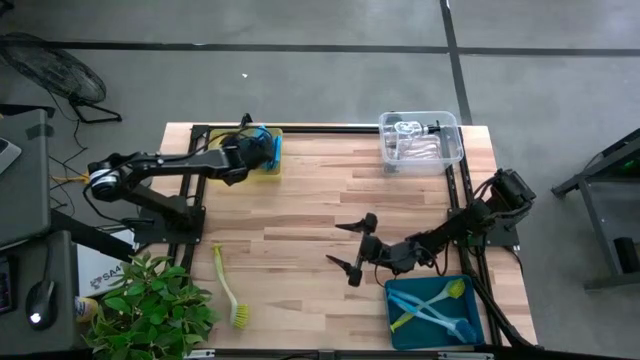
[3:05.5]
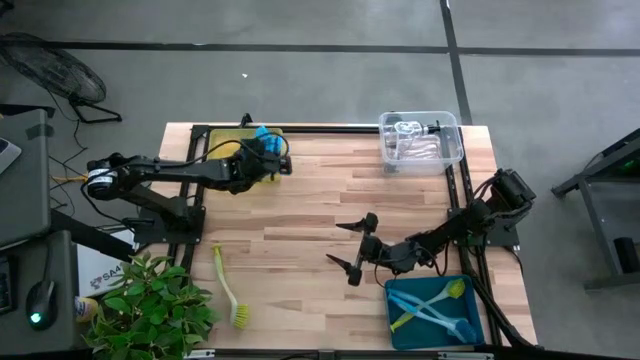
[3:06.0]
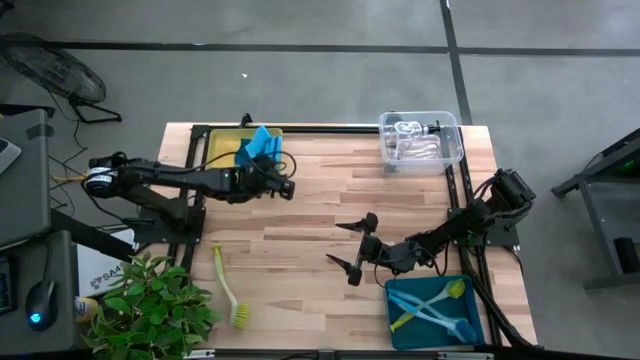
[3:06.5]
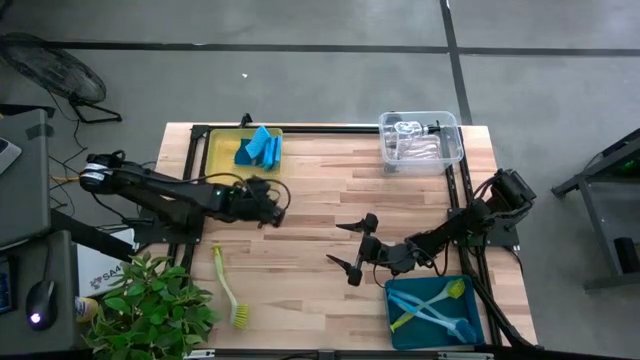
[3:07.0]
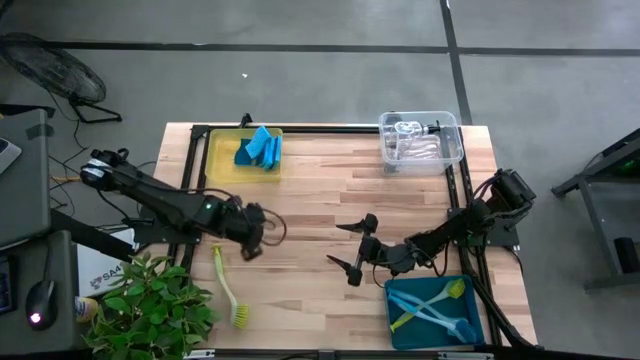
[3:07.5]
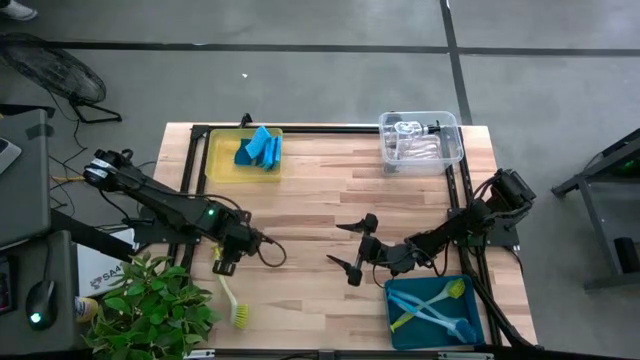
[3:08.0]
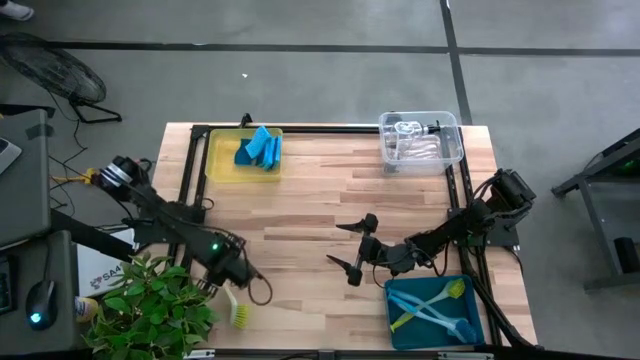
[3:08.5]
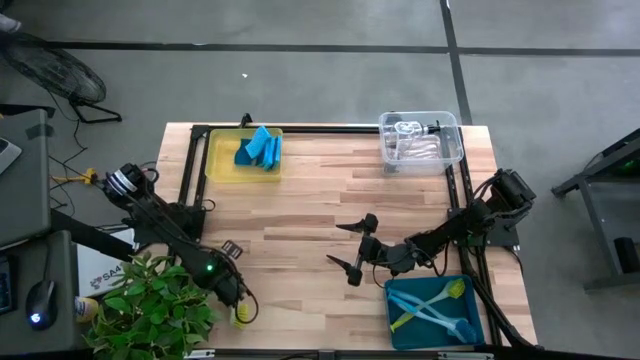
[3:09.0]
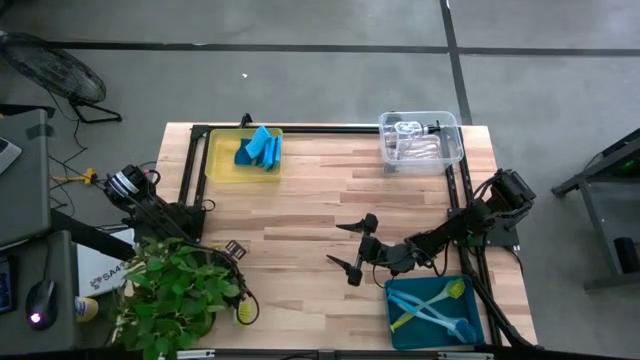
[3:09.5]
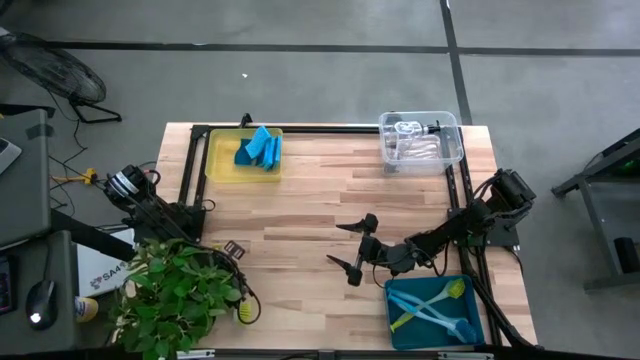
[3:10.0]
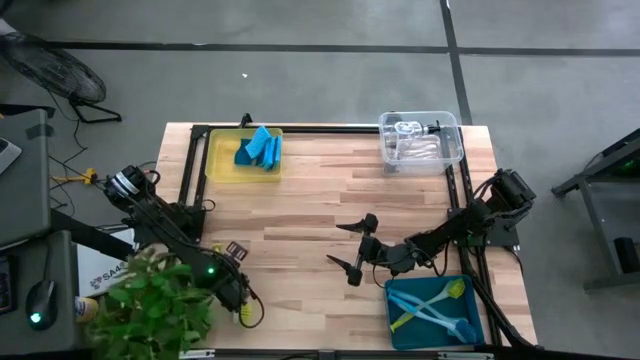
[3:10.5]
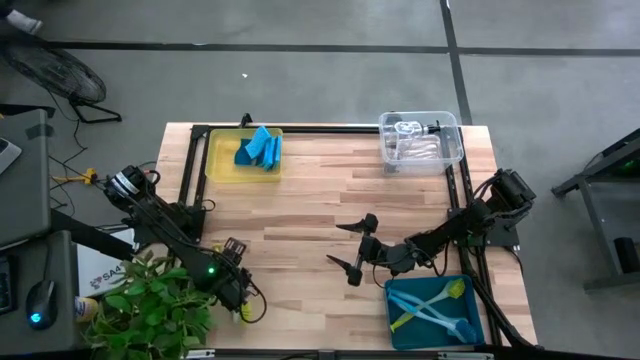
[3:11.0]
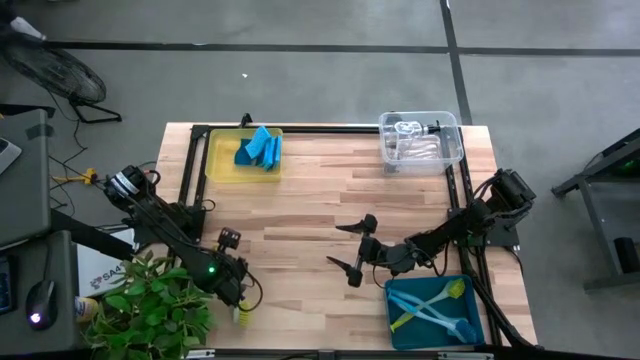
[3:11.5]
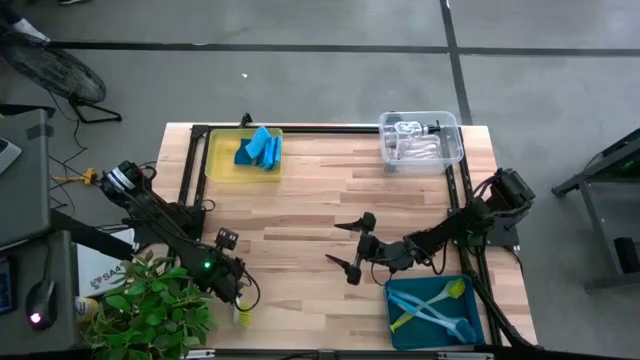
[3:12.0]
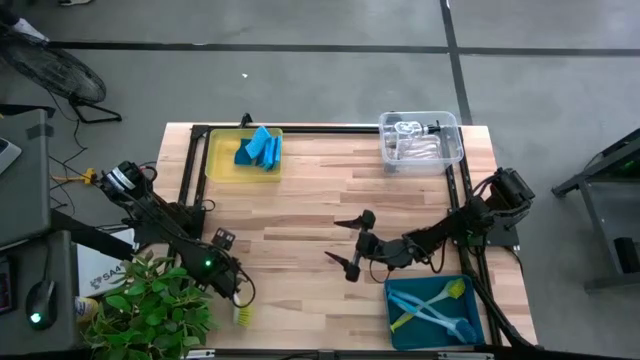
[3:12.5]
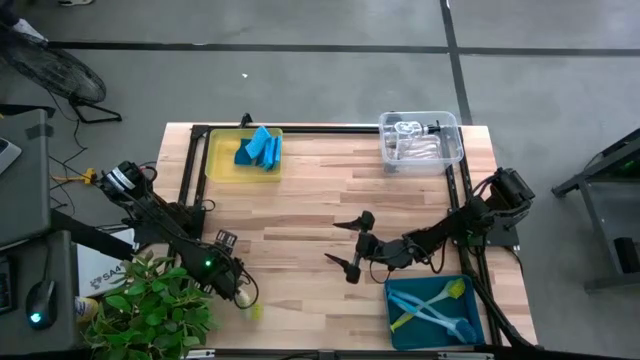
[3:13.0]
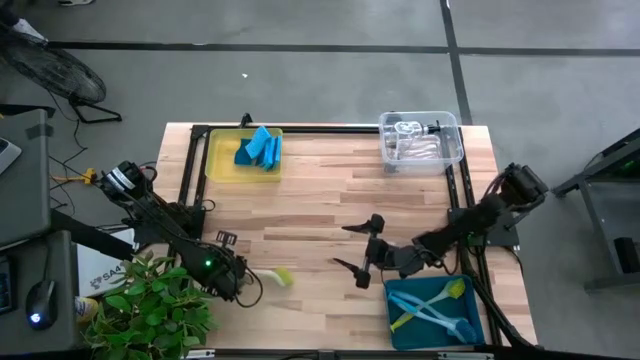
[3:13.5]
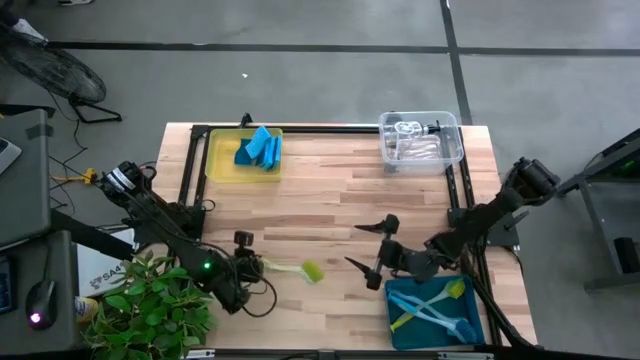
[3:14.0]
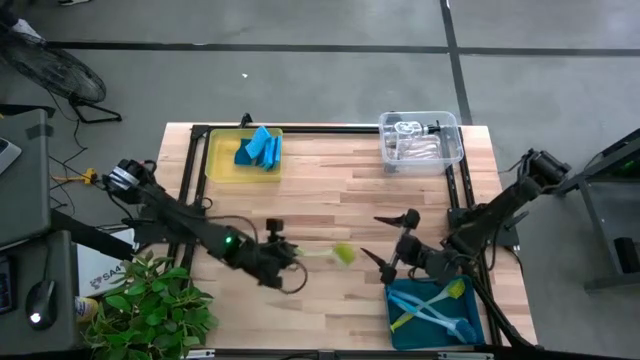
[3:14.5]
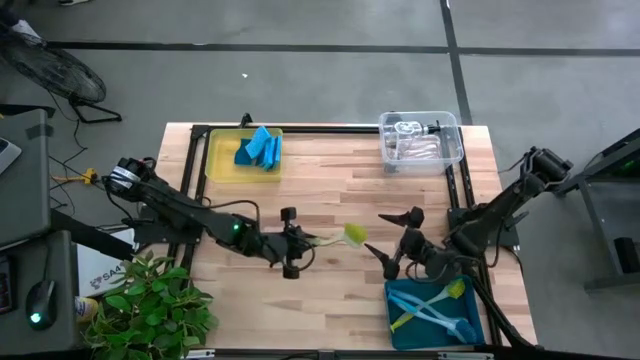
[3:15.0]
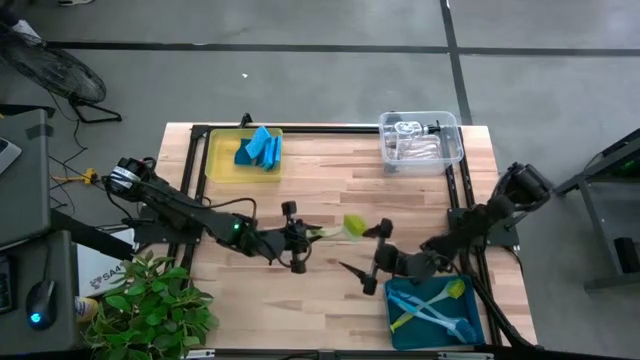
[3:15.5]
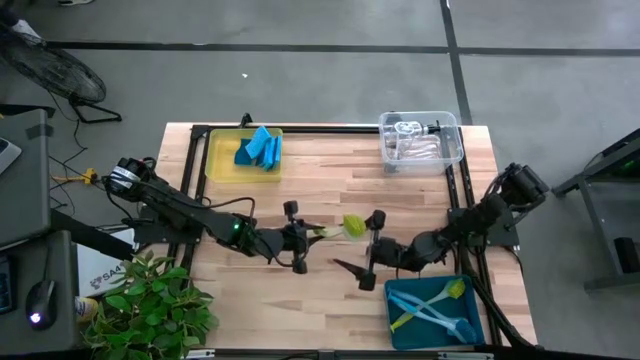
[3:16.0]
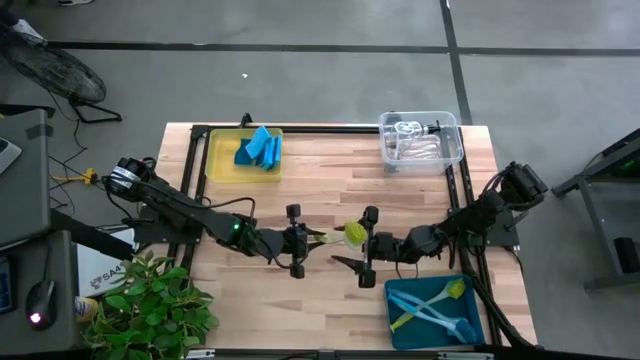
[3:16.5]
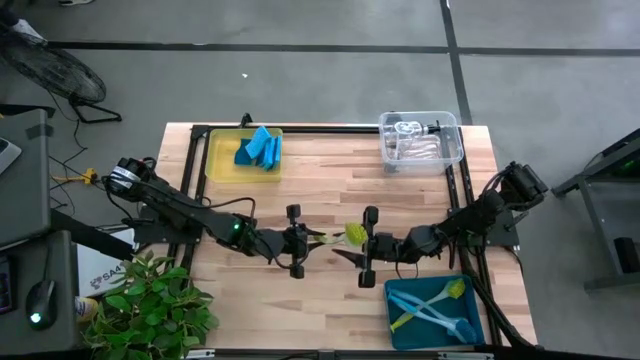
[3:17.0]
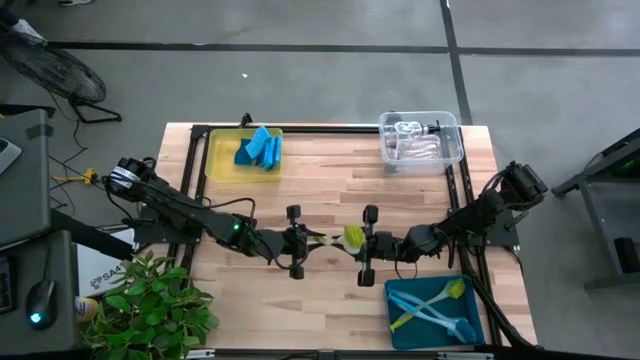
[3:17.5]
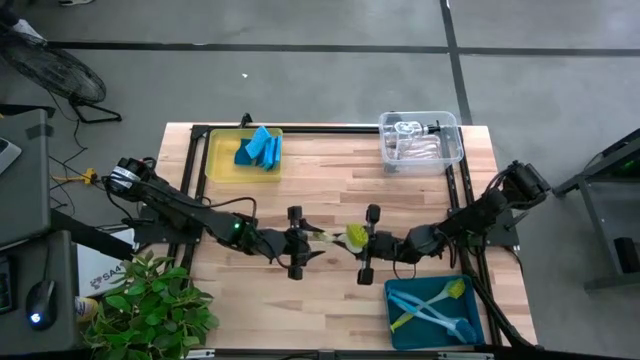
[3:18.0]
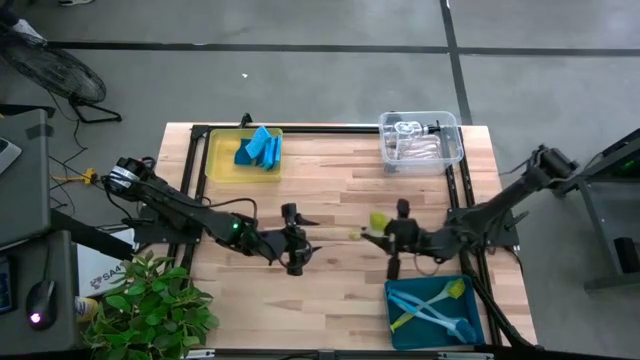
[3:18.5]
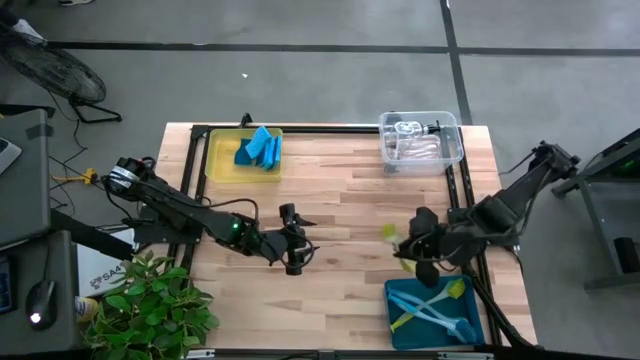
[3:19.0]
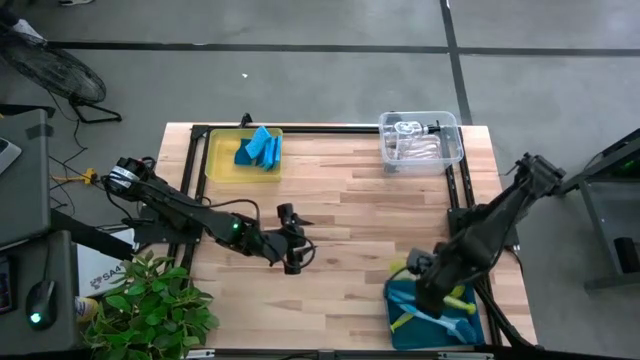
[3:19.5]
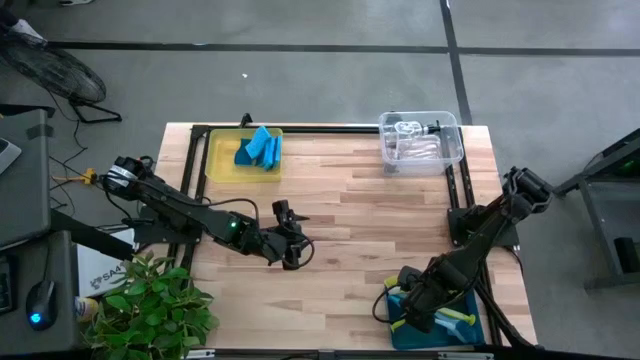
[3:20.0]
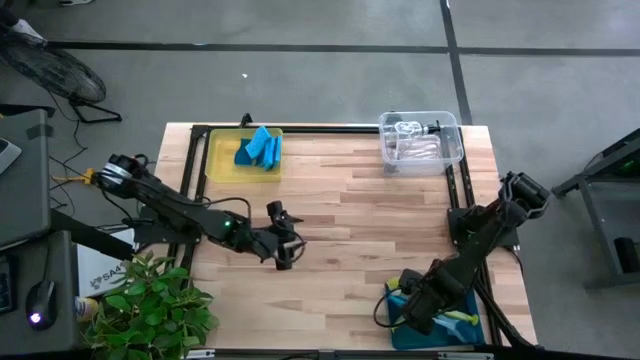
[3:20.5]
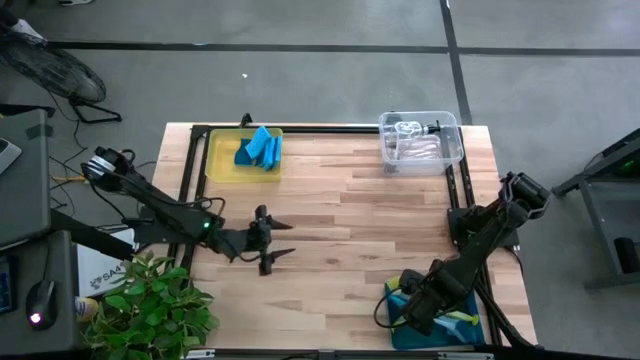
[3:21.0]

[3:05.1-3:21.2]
Task: Pick & Place Kitchen Sink Supplies
Put the yellow dish brush into the blue bin

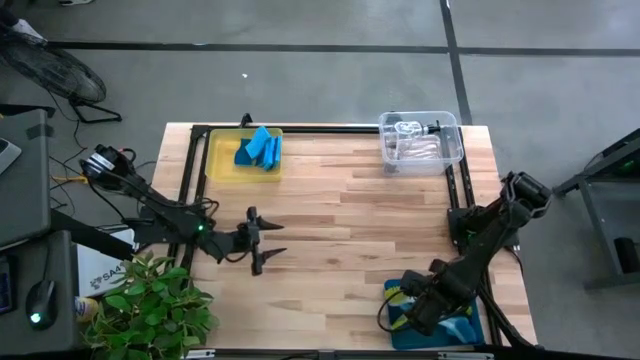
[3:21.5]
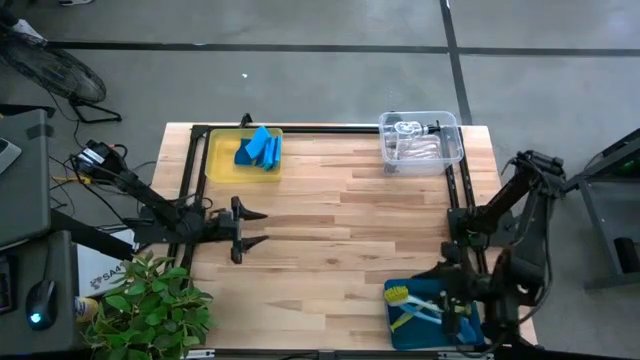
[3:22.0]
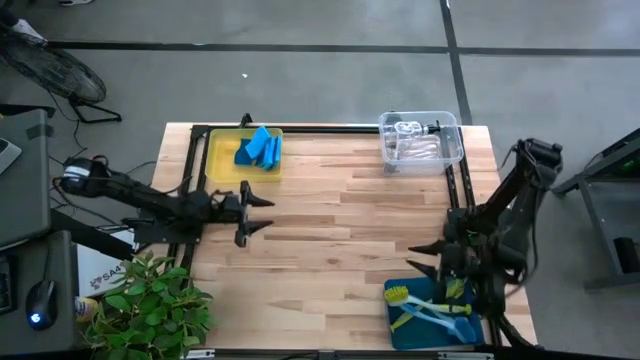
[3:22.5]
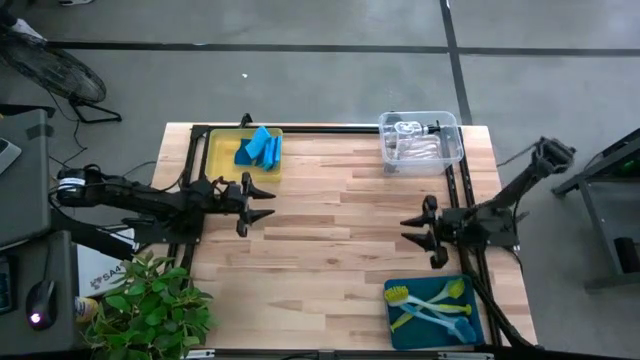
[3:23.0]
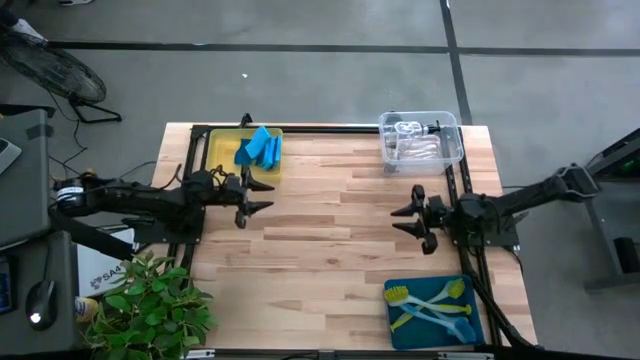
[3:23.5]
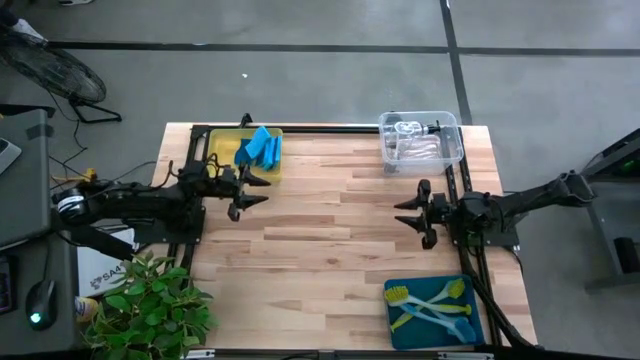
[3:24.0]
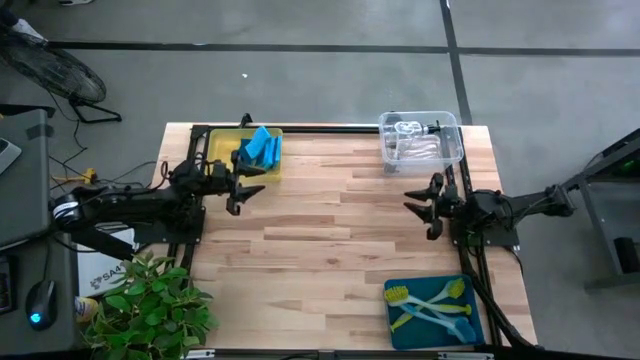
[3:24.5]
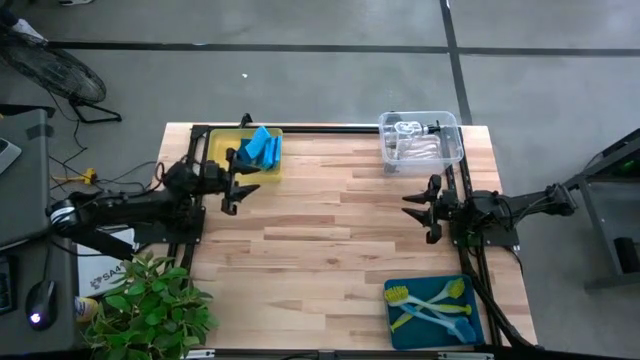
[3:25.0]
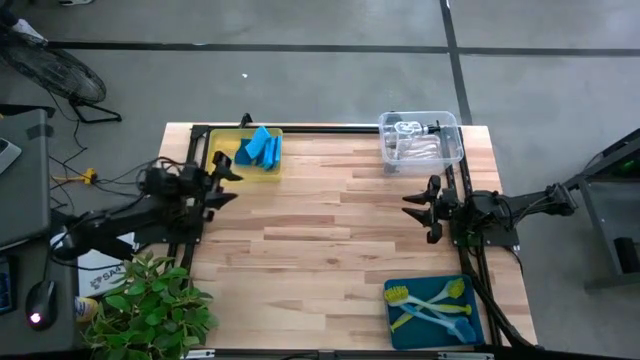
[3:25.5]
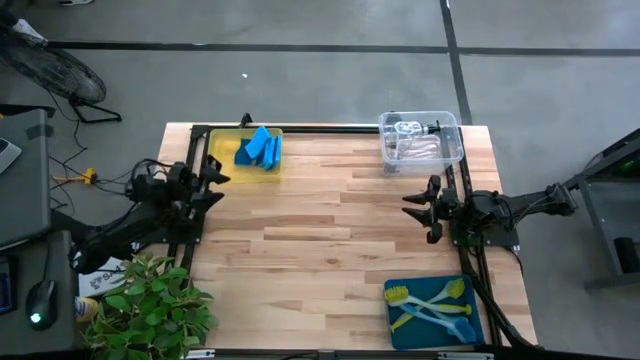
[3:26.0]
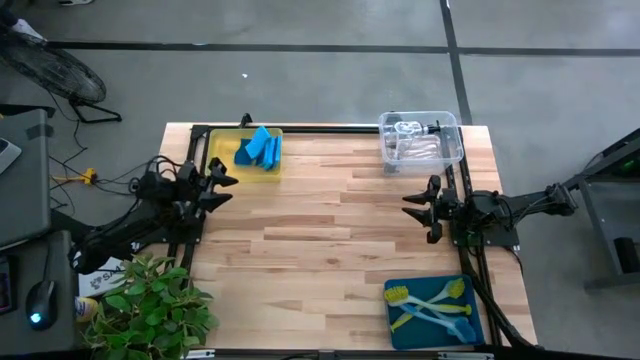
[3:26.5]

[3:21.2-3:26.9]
Return to Home Position
